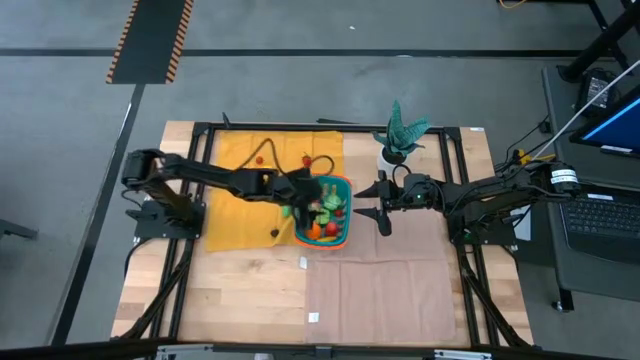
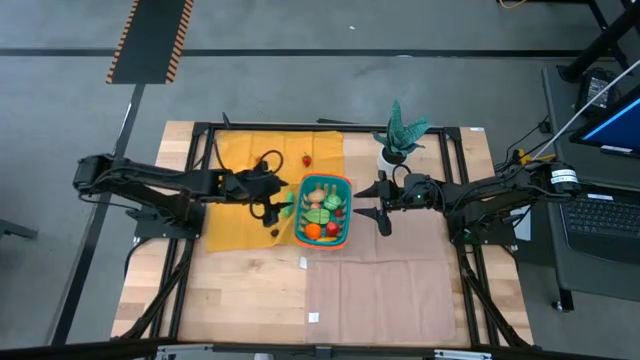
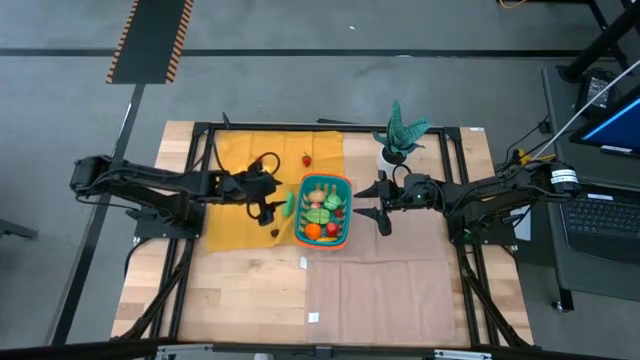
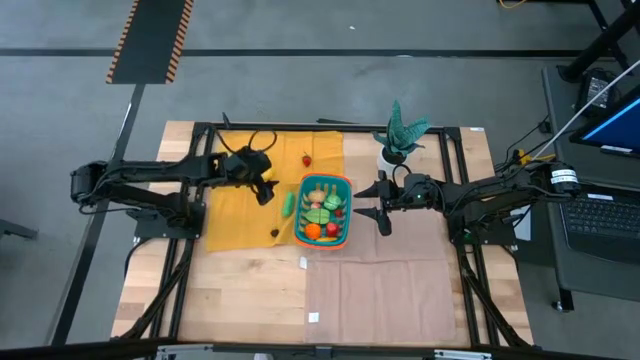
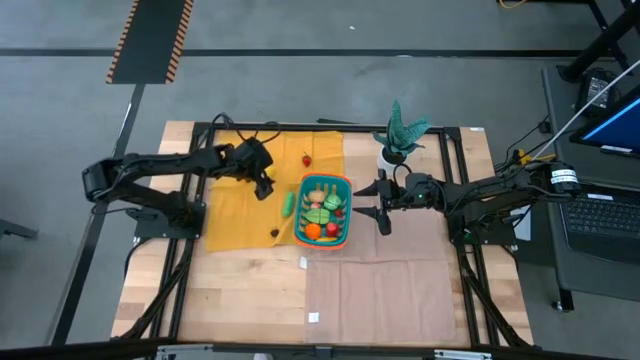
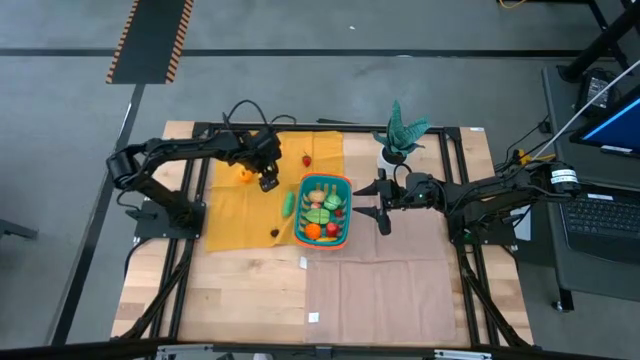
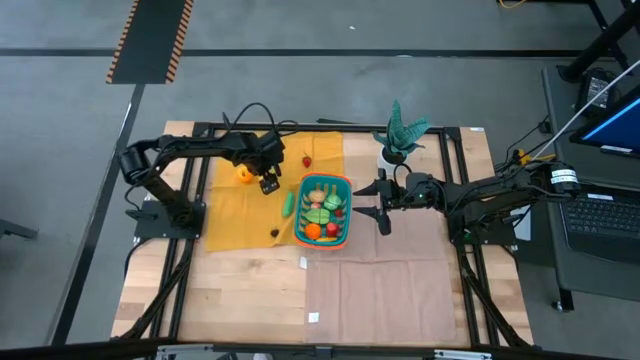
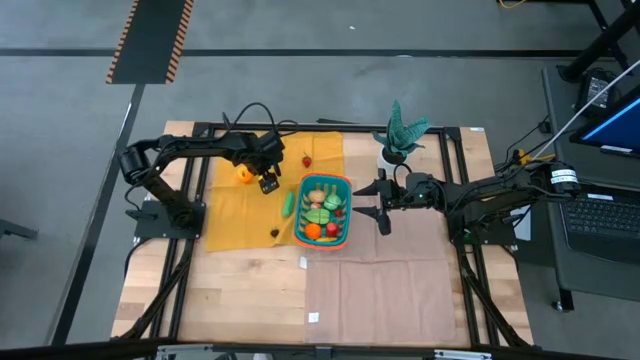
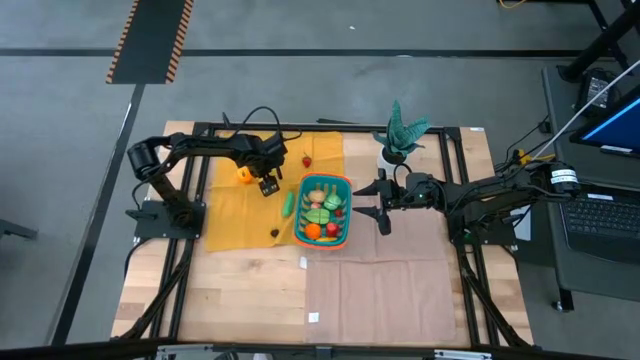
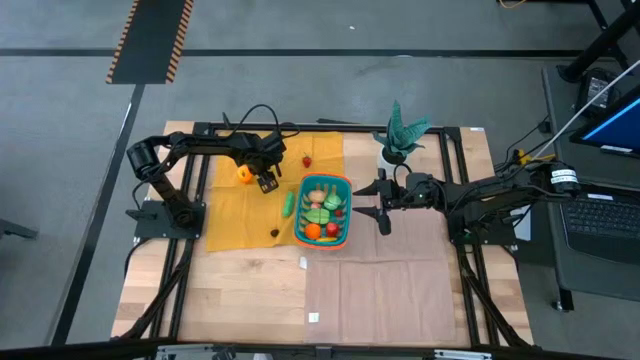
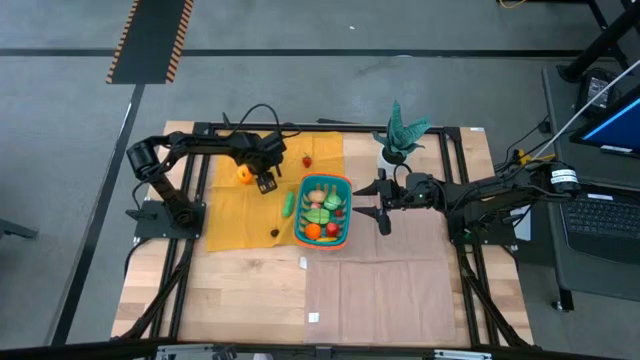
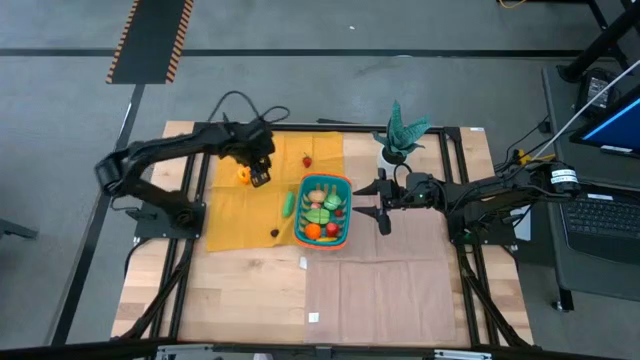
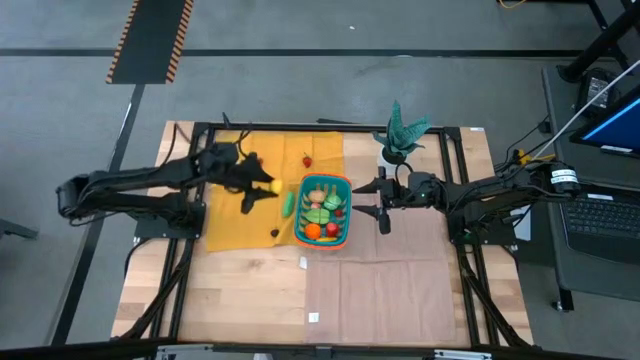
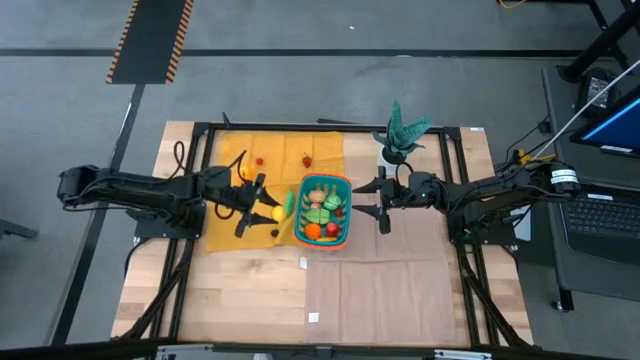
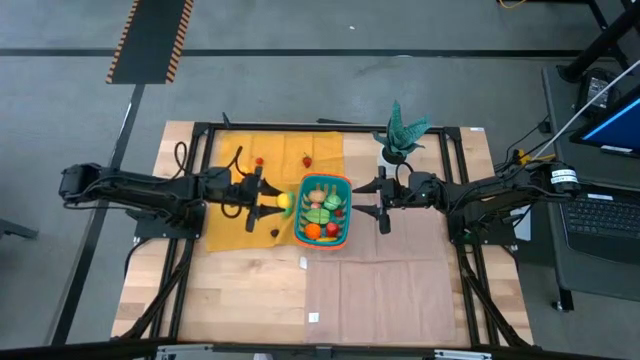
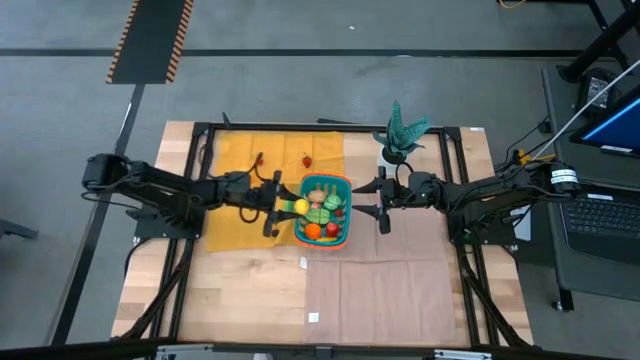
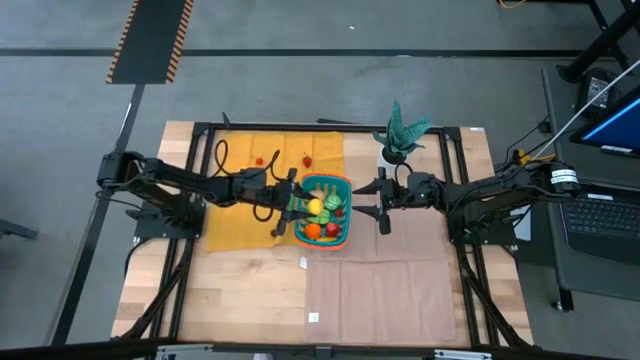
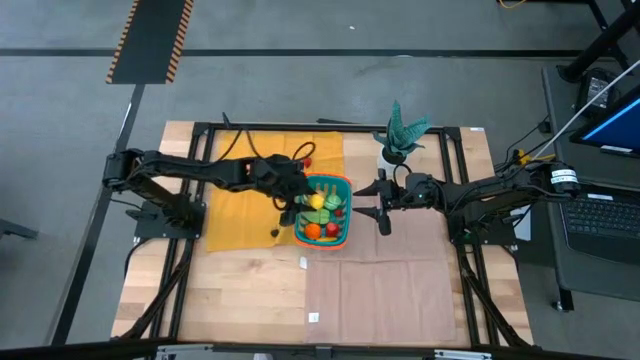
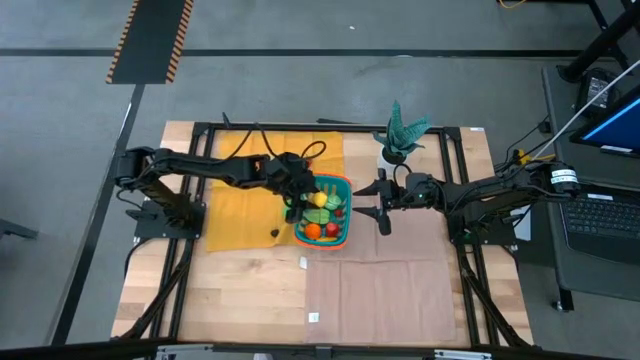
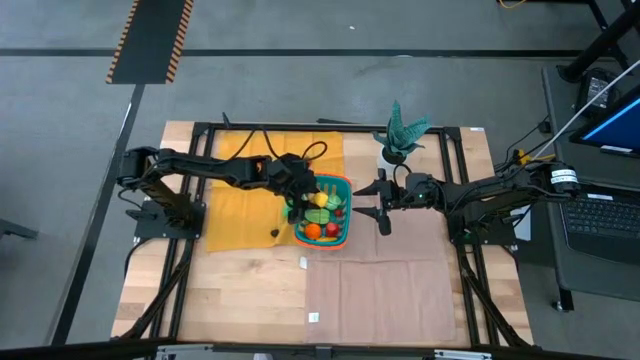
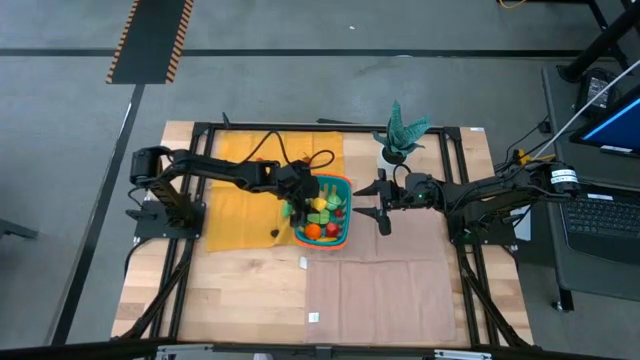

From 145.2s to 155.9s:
Task: Pick and placing Produce into tupperware
Put the lemon into the basket

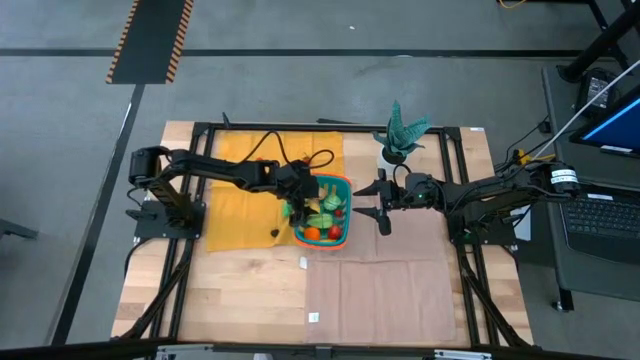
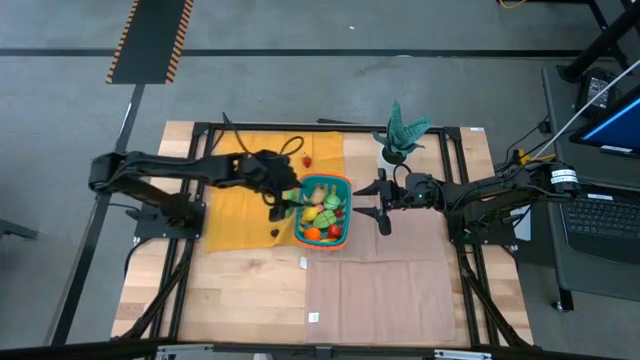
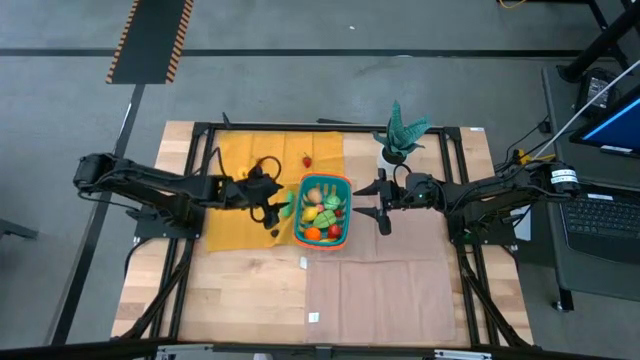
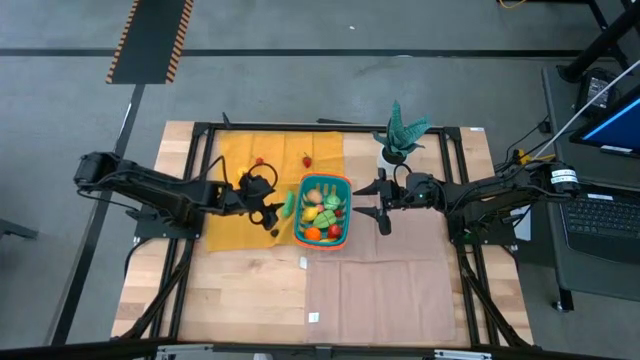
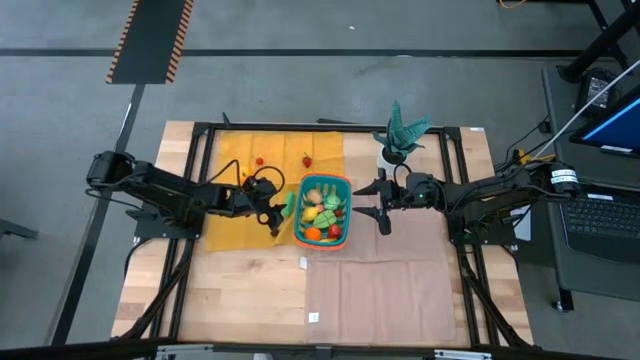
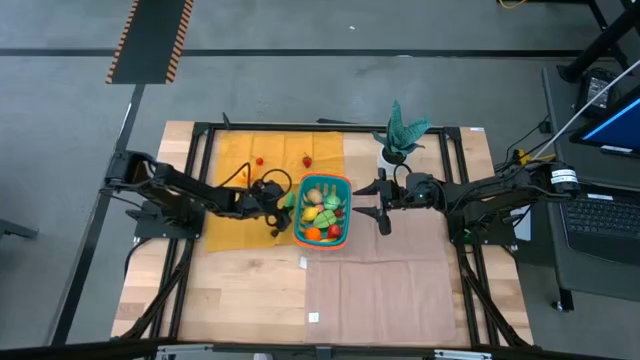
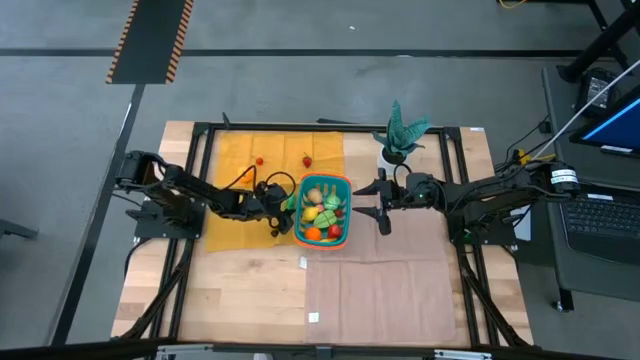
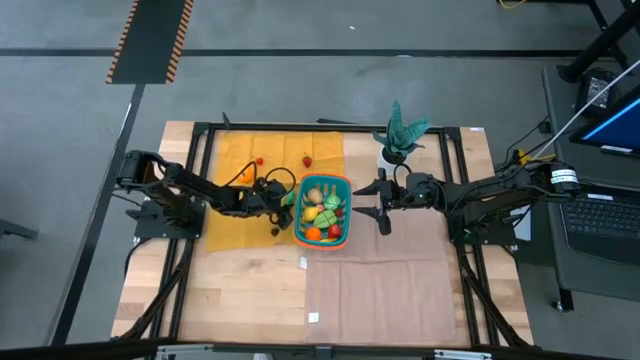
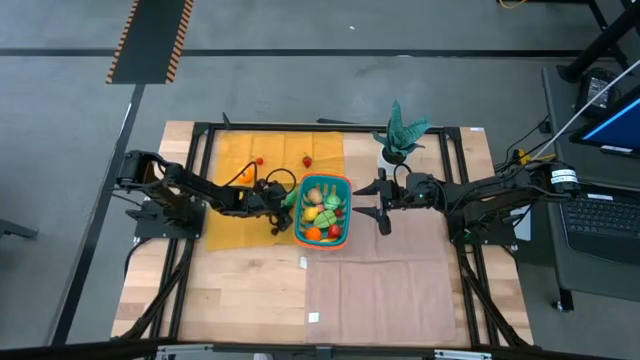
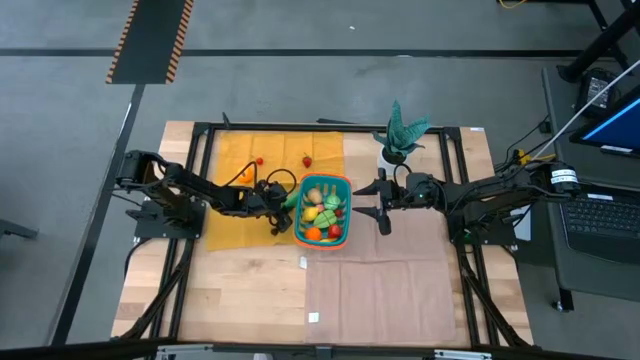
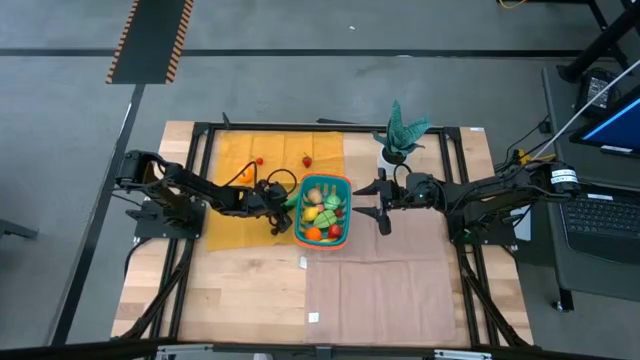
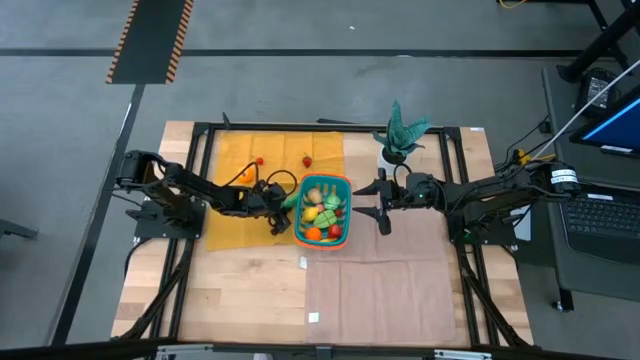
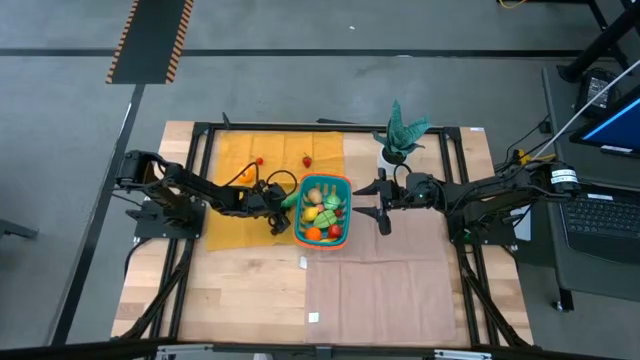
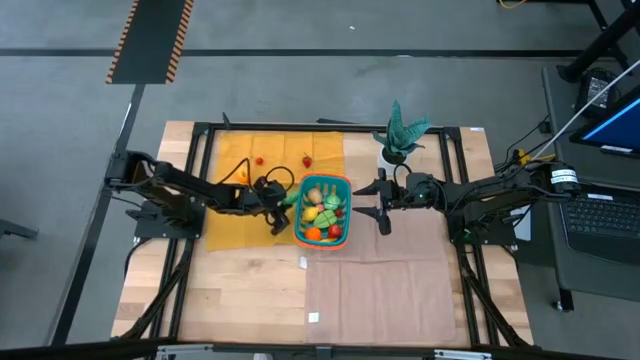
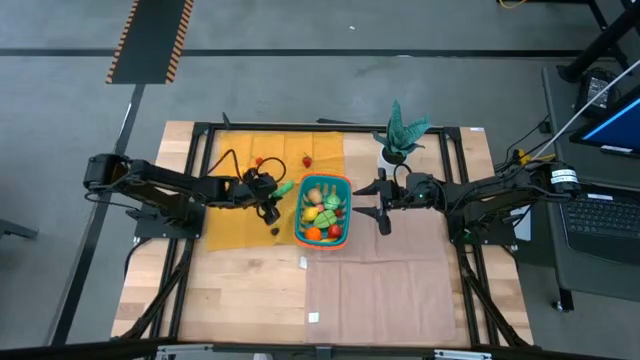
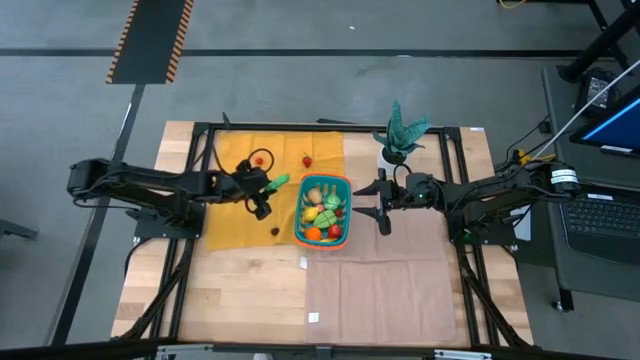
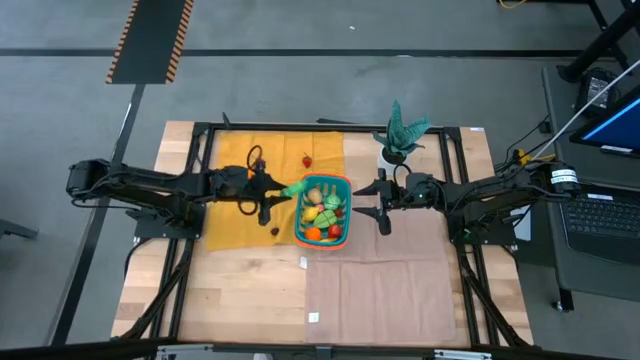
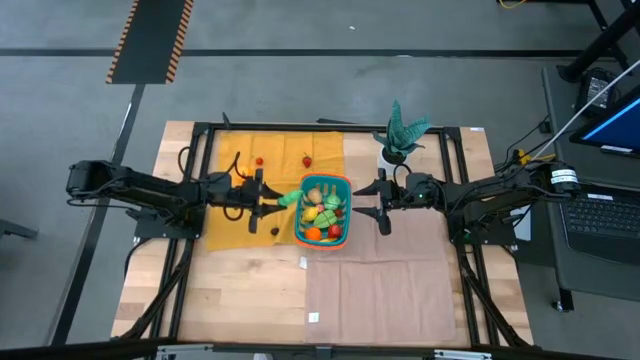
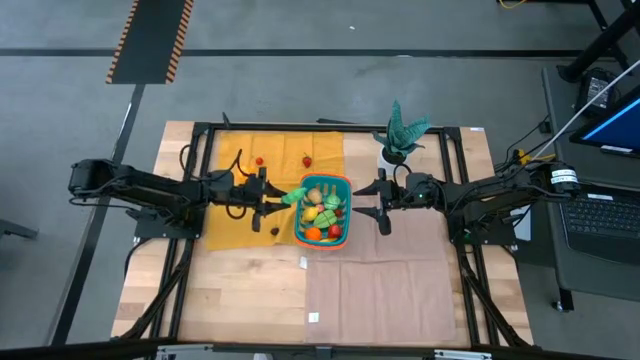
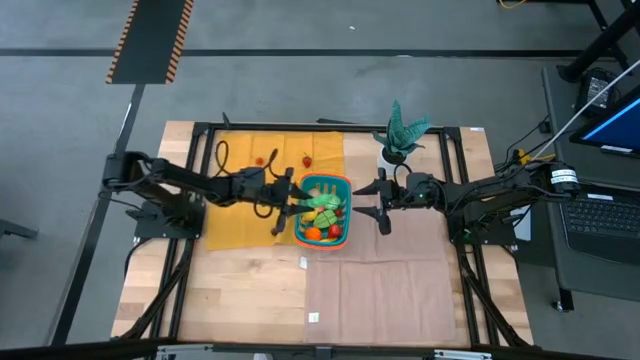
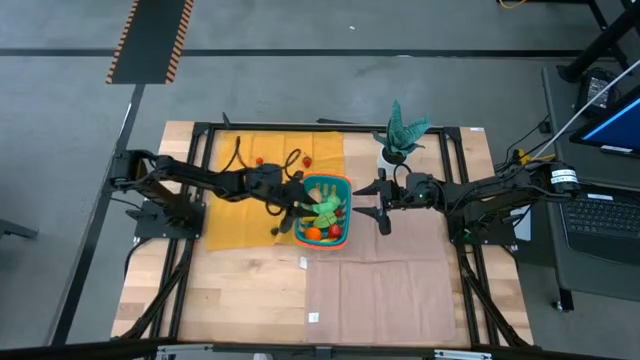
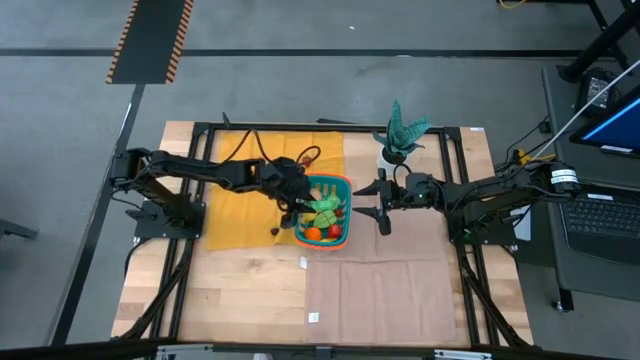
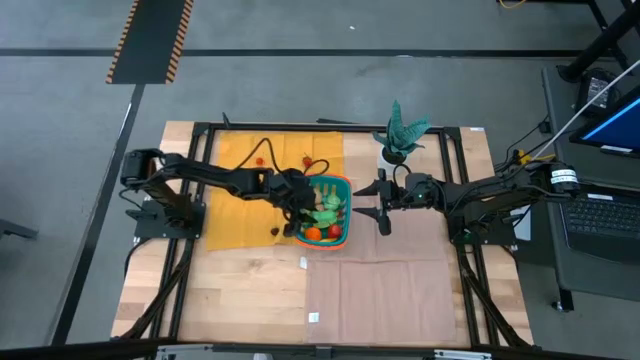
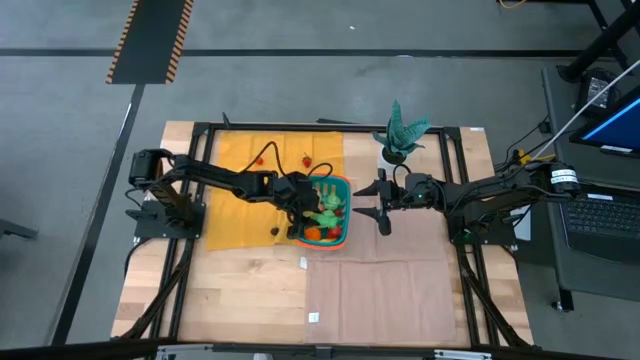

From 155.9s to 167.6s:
Put the pea into the basket
